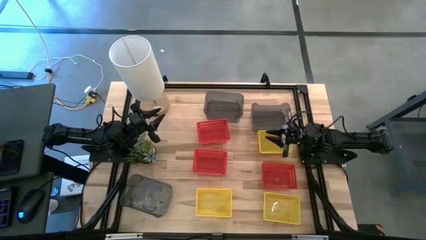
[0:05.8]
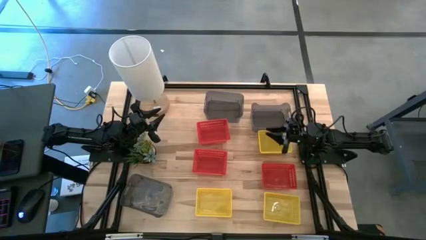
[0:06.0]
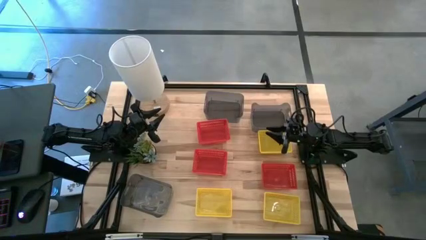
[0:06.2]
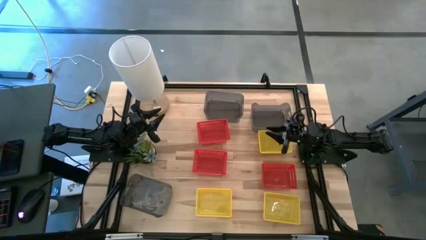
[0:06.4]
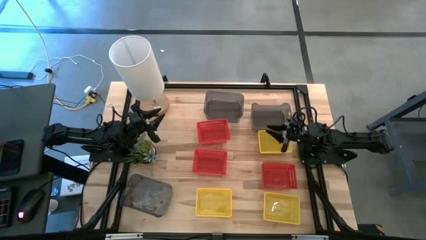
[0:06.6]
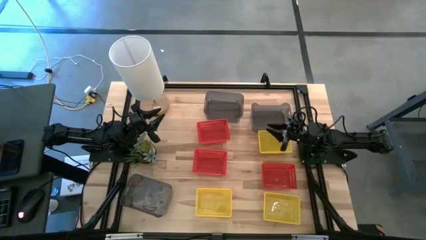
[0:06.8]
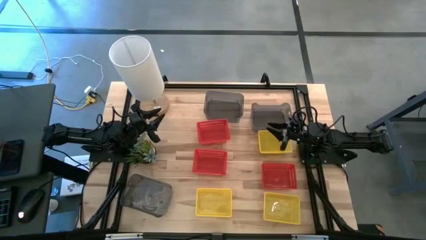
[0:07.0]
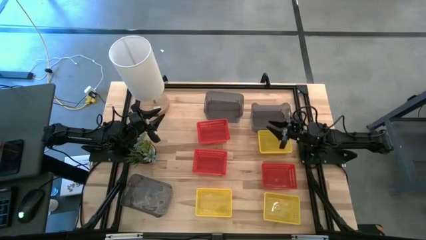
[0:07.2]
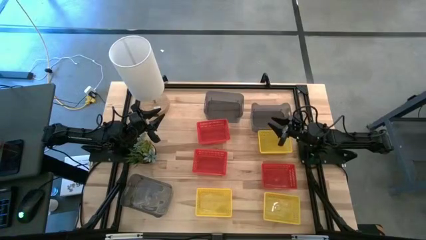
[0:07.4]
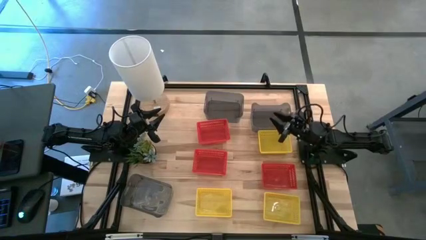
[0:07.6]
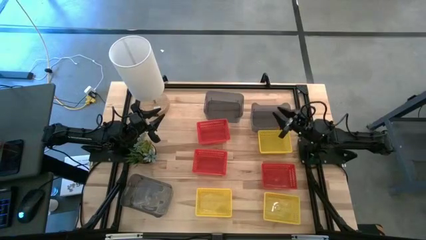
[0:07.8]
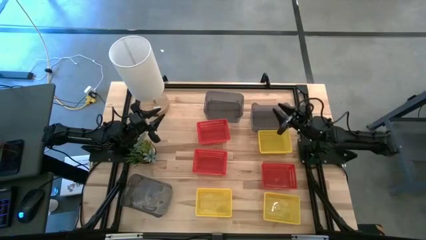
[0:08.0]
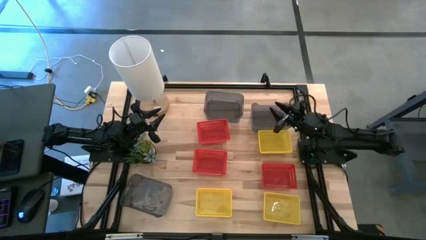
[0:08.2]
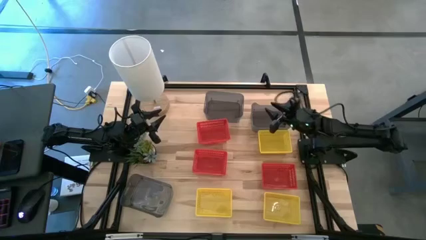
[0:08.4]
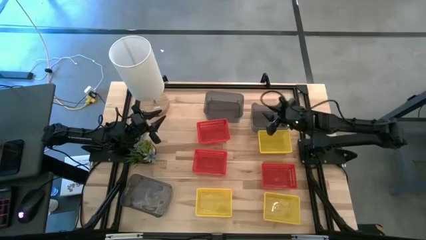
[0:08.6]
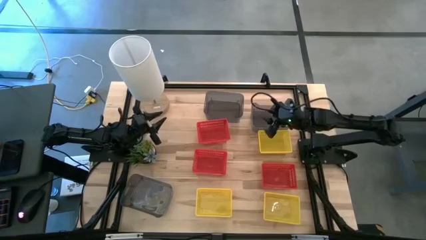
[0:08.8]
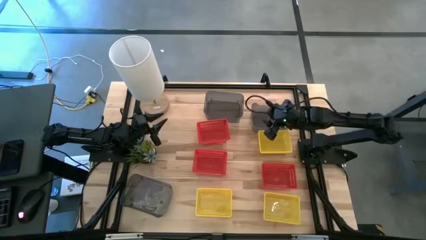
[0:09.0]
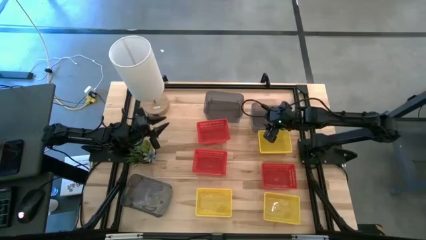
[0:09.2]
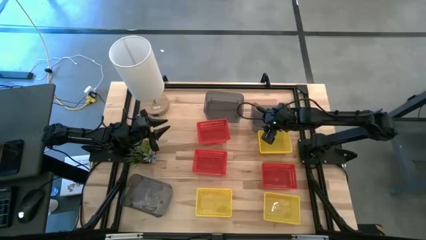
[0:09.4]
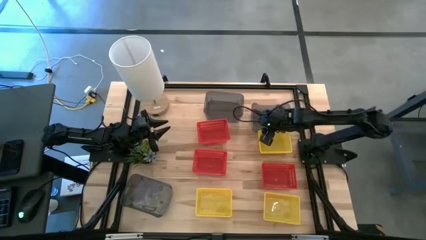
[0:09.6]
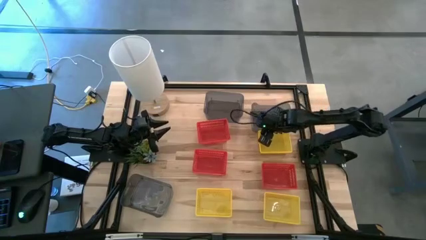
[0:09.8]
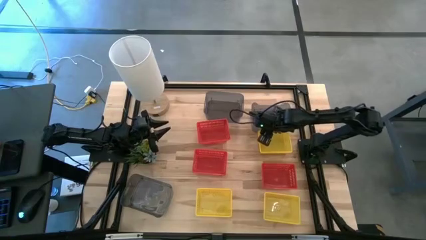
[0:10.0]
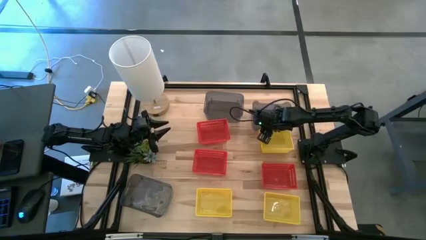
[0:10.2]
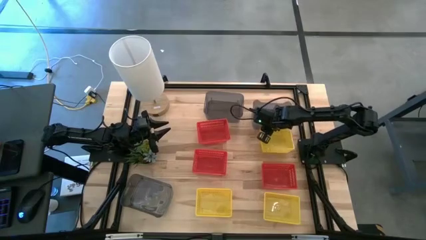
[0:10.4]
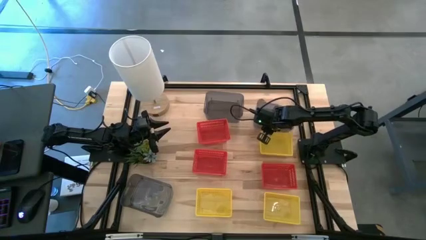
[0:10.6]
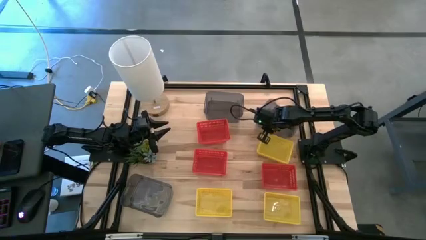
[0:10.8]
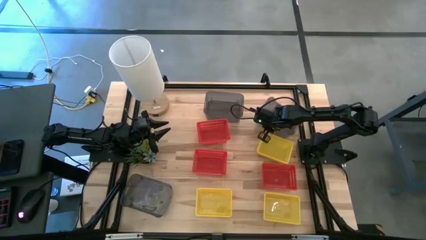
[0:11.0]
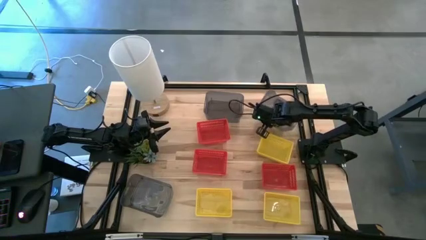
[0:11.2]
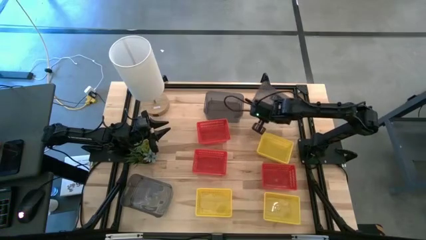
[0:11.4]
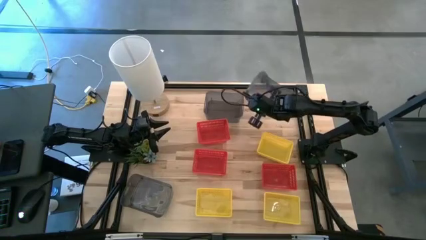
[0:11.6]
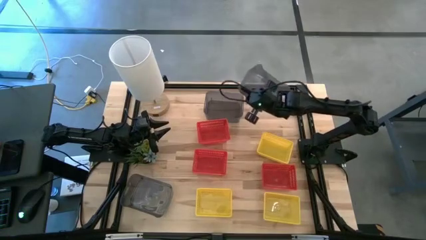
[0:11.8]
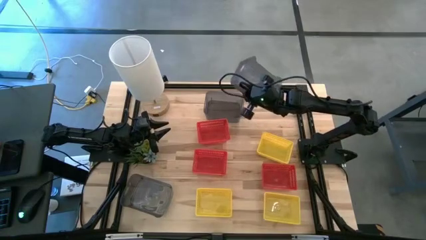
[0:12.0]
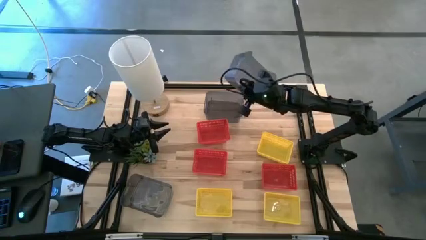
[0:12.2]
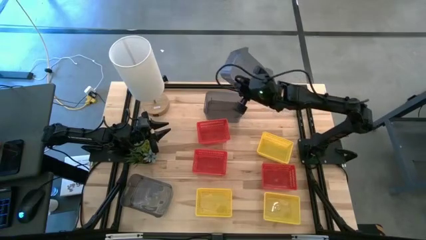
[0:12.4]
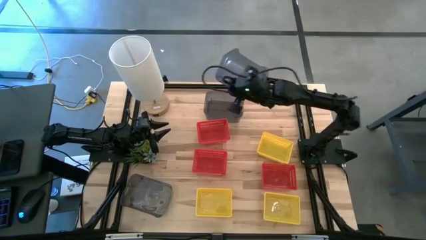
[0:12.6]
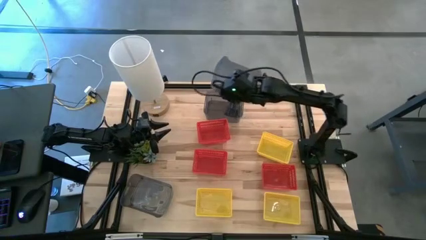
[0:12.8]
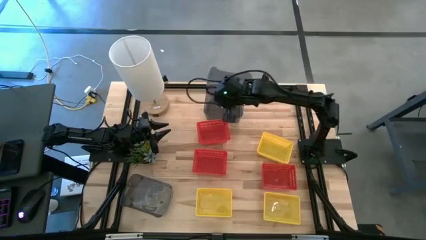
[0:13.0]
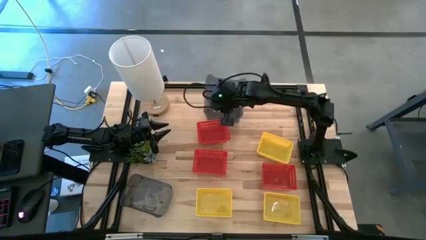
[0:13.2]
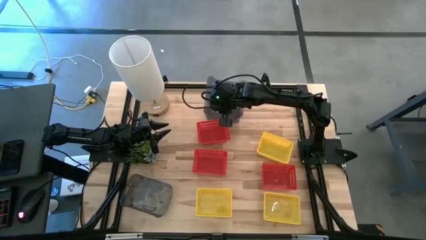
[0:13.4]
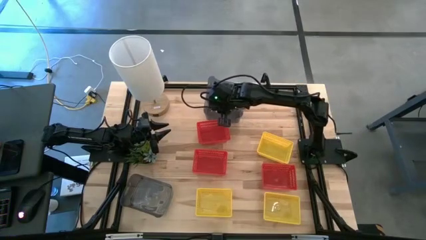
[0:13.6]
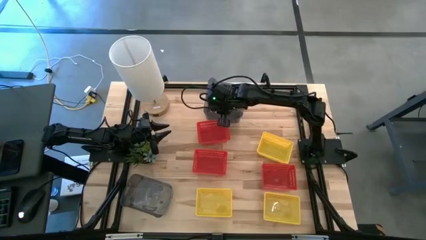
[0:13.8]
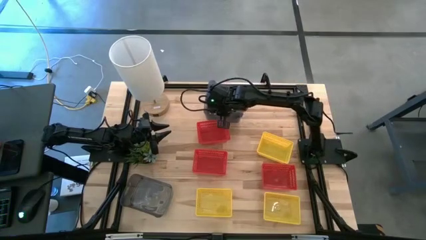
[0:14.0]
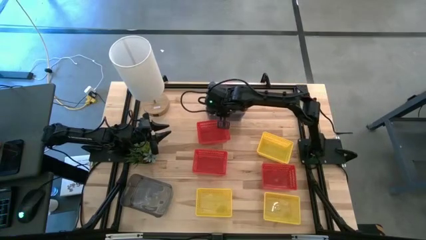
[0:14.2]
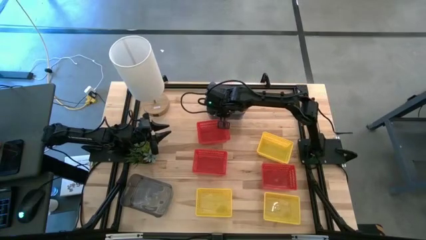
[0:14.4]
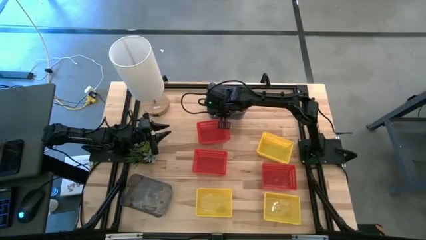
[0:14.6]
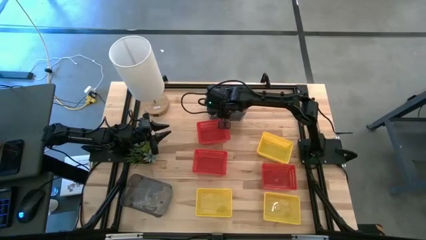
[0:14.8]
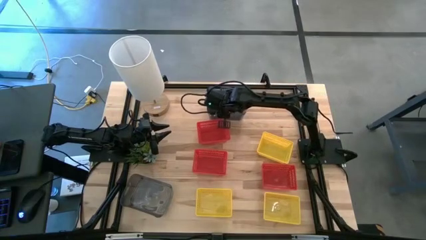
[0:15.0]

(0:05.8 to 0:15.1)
Stack the right black bin on the middle black bin

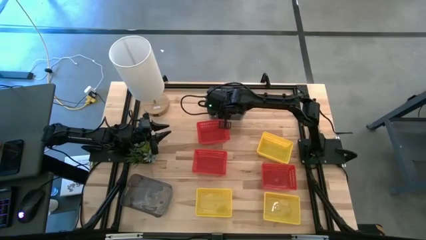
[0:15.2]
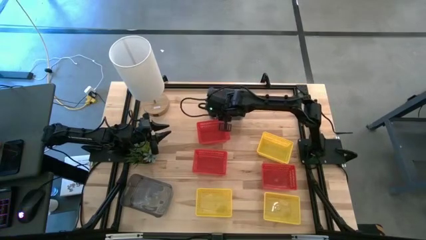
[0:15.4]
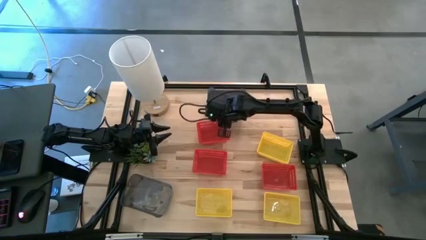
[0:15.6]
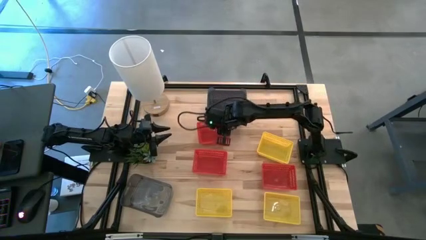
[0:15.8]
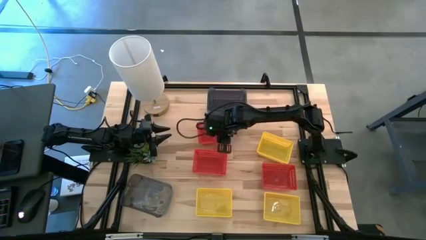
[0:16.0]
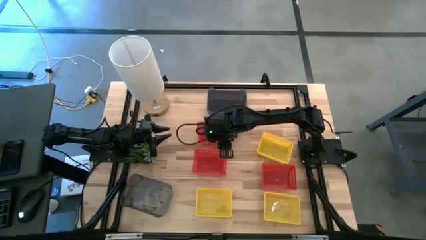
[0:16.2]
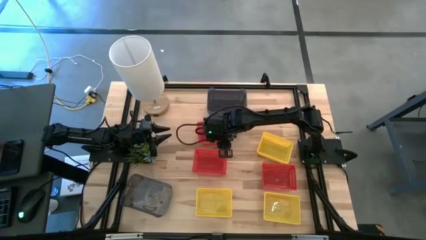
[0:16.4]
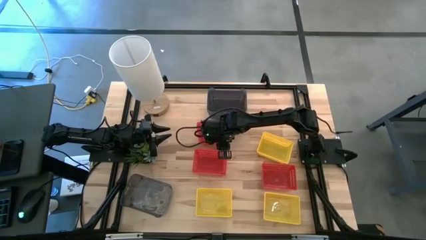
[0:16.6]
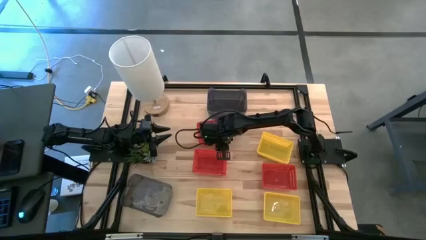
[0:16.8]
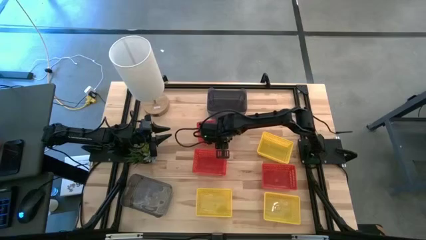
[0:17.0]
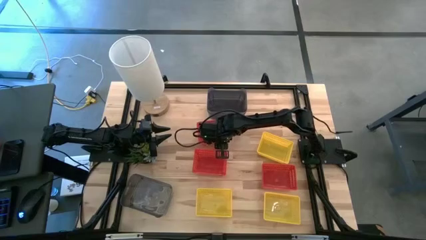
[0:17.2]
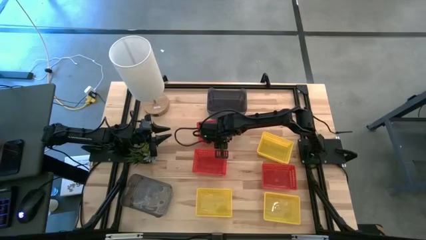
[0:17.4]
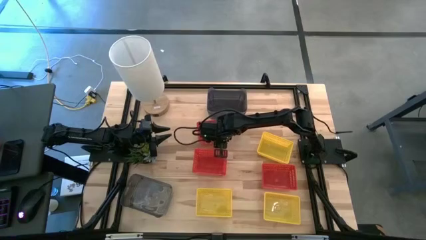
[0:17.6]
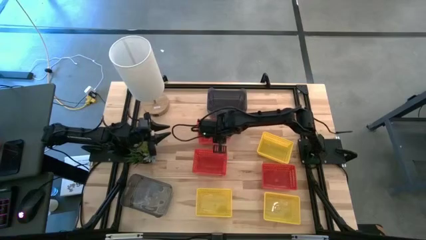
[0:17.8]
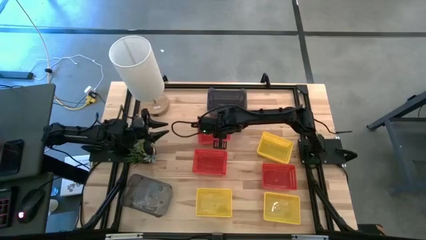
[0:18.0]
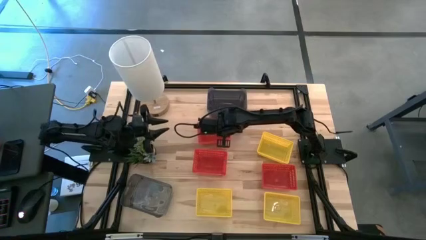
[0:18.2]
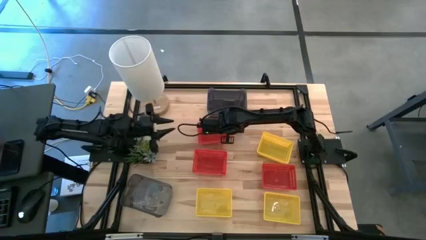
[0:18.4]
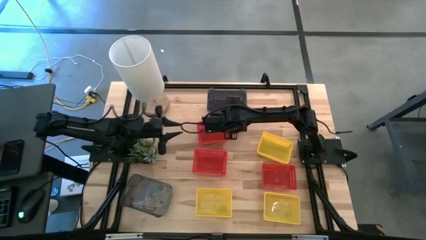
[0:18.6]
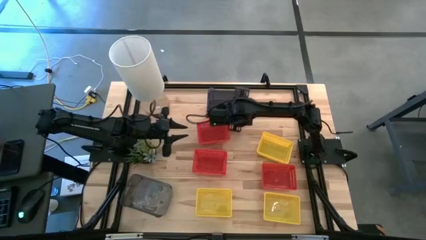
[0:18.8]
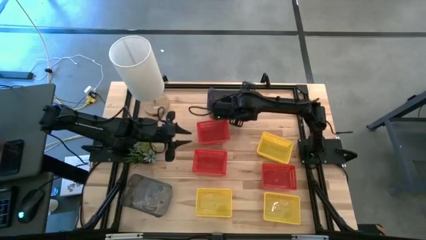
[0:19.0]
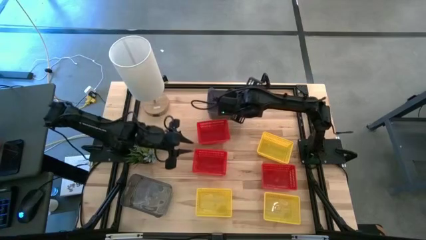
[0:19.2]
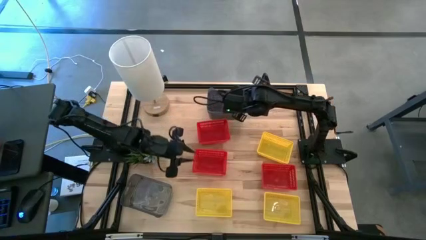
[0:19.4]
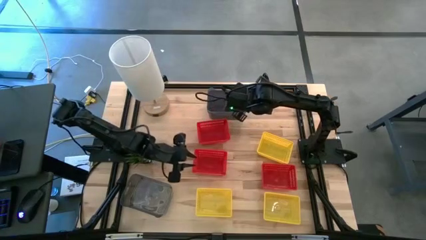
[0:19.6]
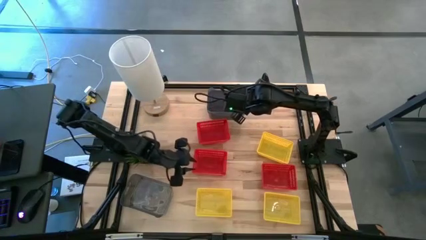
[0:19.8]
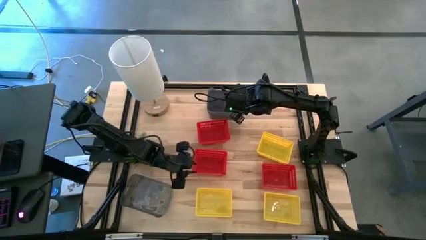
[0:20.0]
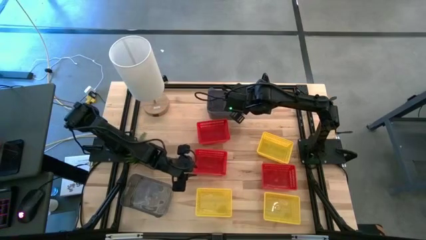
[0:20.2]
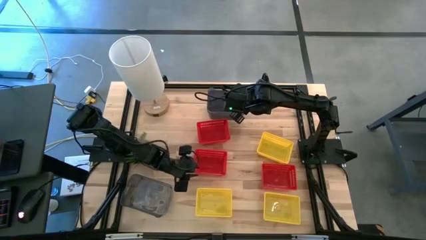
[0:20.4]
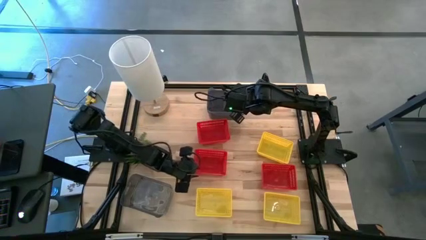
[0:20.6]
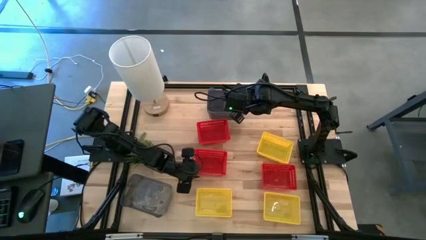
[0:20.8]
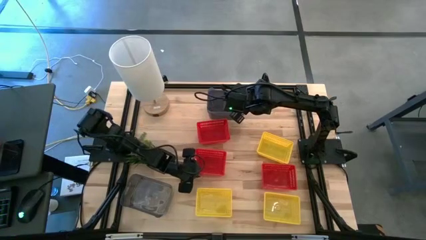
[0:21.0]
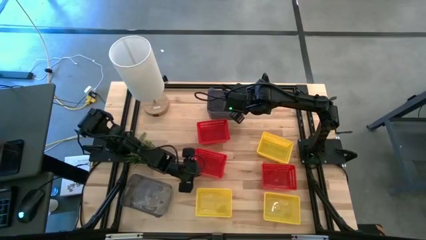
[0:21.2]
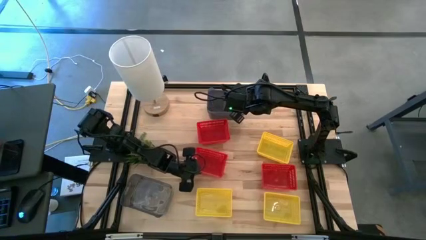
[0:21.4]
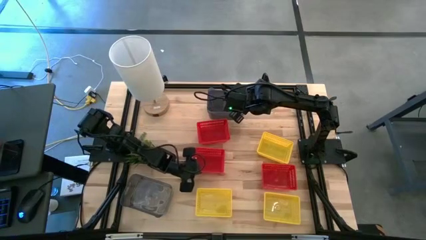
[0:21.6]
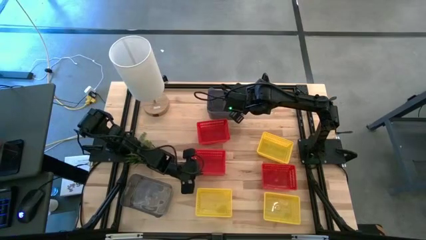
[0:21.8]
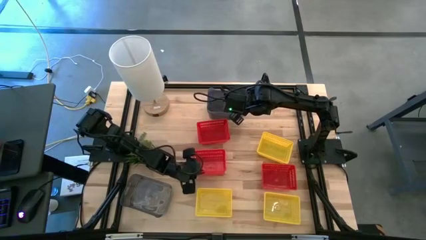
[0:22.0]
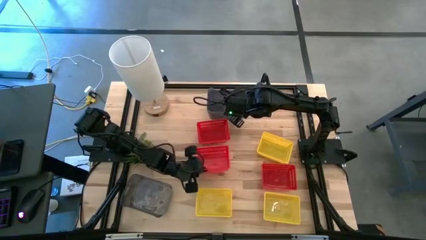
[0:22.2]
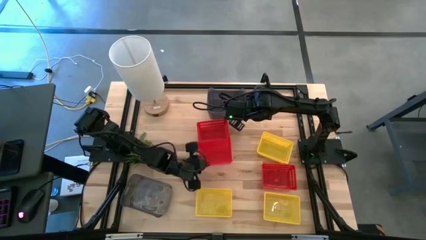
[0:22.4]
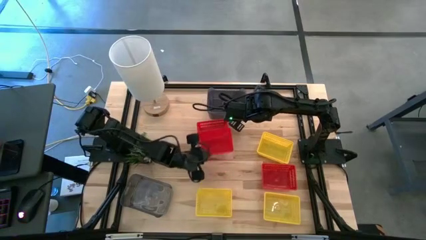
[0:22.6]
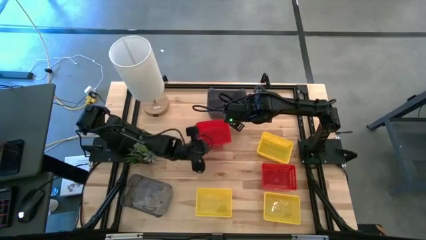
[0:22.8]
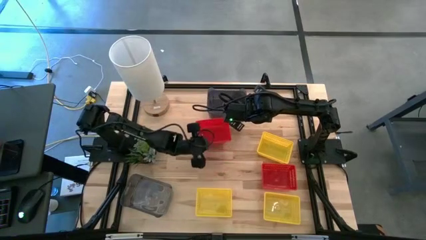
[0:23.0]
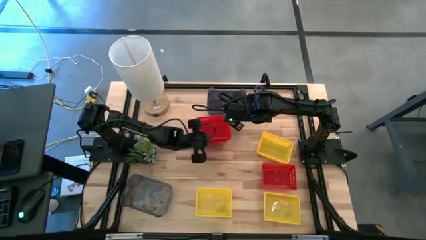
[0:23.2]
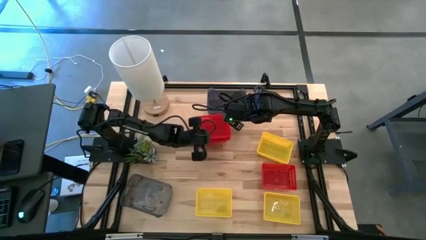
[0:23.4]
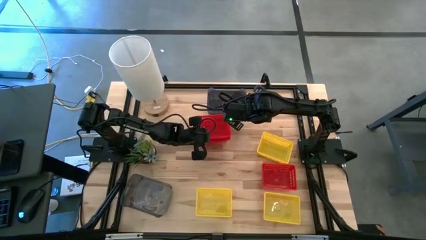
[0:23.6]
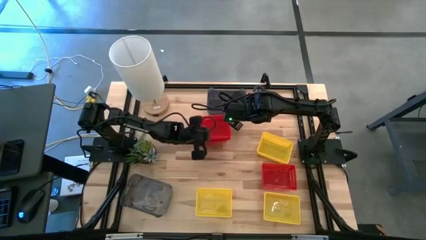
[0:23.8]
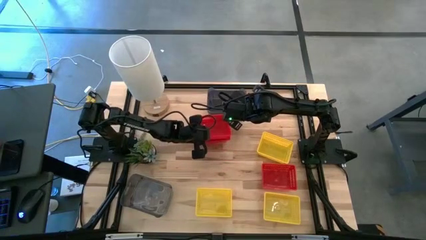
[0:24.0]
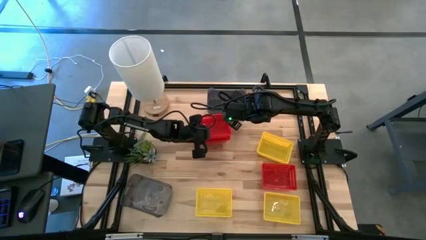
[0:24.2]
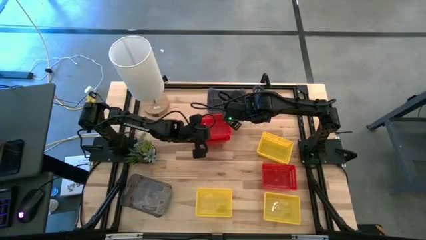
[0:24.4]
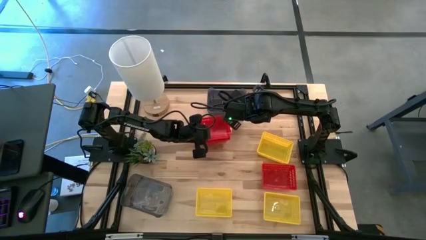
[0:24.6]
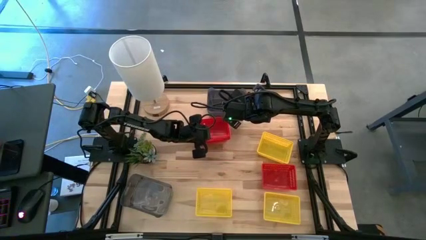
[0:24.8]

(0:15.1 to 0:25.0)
Stack the bottom left red bin on the top red bin
